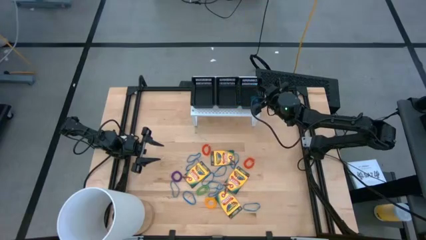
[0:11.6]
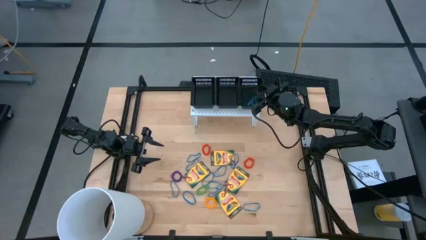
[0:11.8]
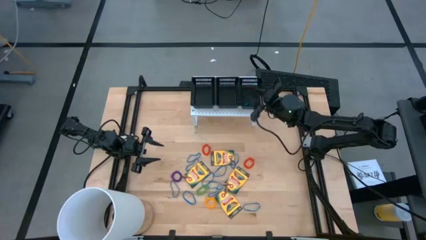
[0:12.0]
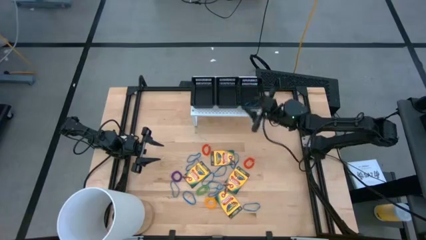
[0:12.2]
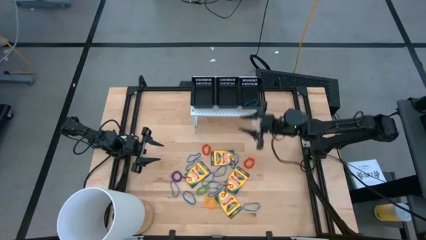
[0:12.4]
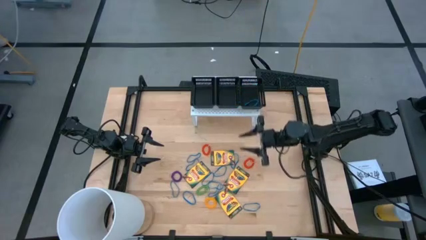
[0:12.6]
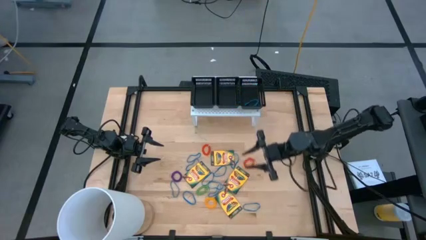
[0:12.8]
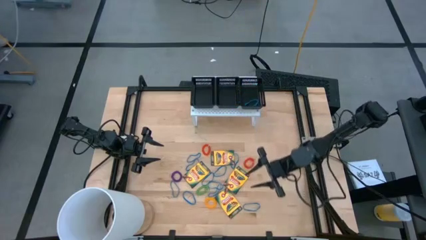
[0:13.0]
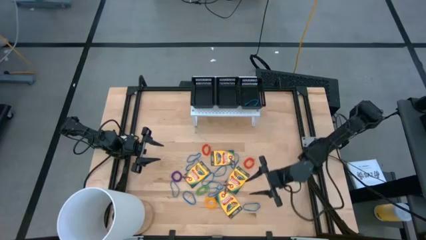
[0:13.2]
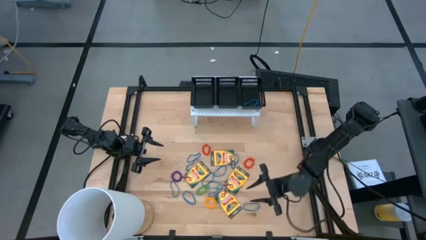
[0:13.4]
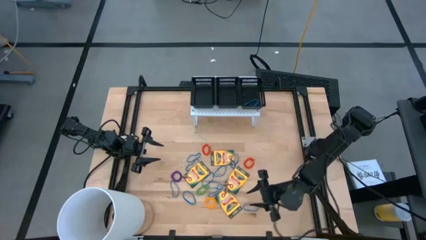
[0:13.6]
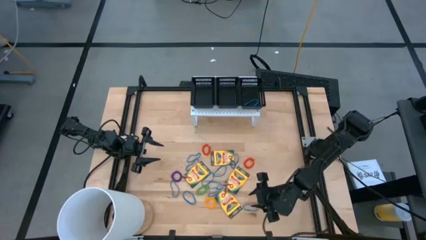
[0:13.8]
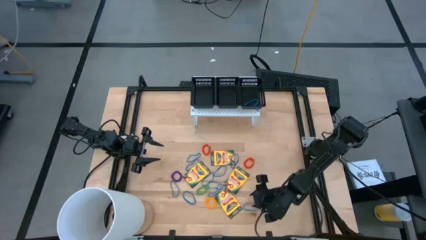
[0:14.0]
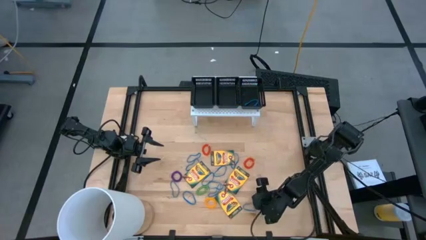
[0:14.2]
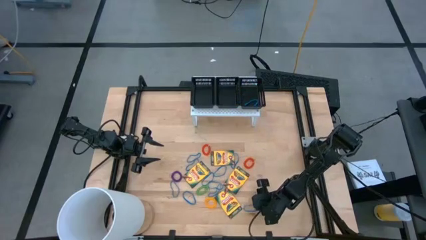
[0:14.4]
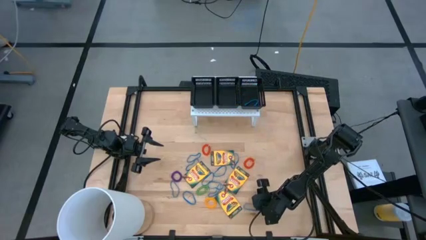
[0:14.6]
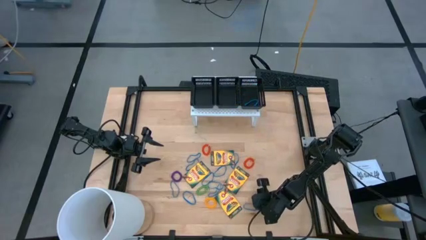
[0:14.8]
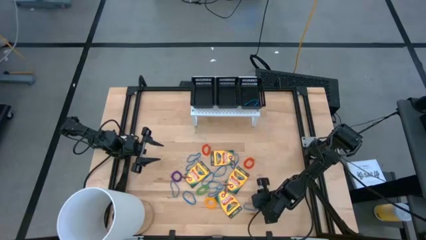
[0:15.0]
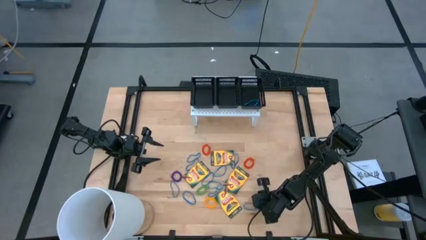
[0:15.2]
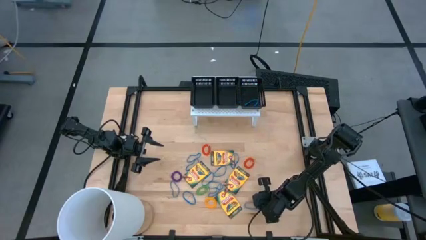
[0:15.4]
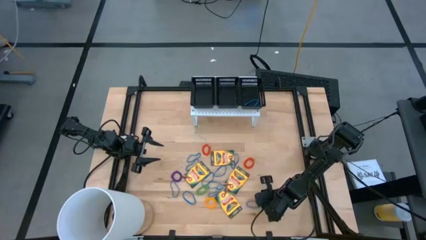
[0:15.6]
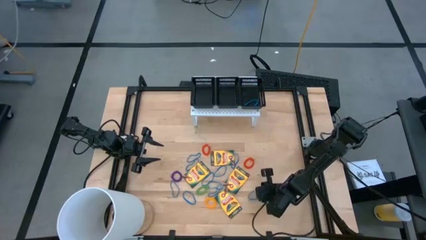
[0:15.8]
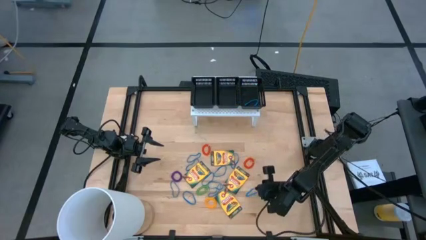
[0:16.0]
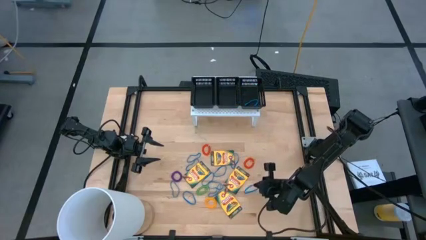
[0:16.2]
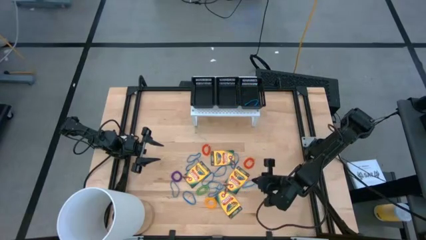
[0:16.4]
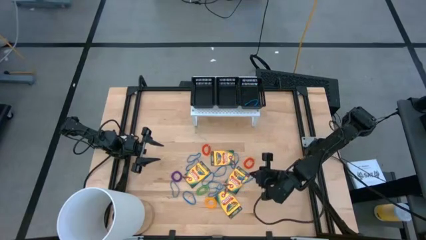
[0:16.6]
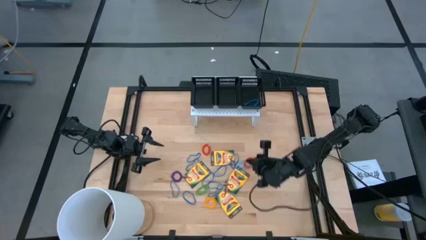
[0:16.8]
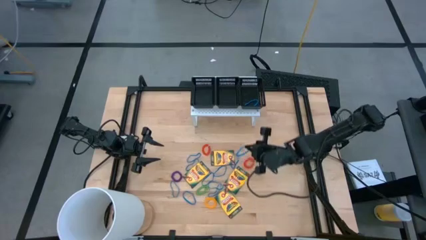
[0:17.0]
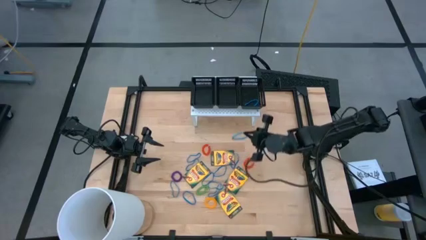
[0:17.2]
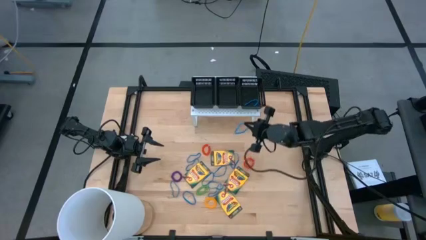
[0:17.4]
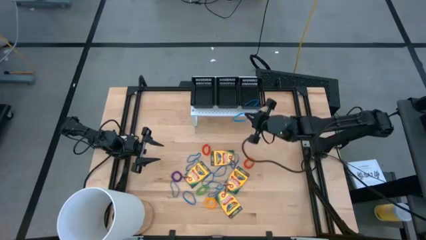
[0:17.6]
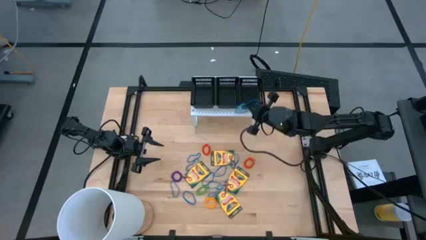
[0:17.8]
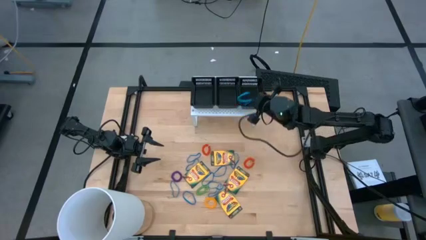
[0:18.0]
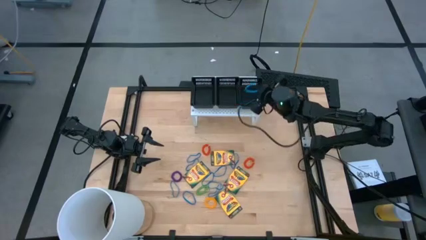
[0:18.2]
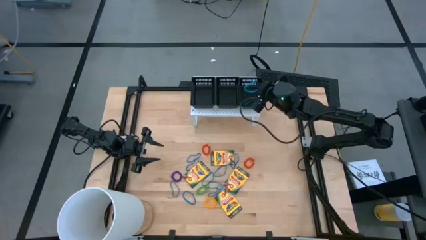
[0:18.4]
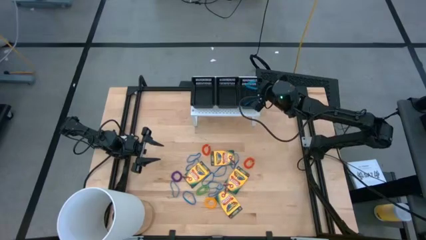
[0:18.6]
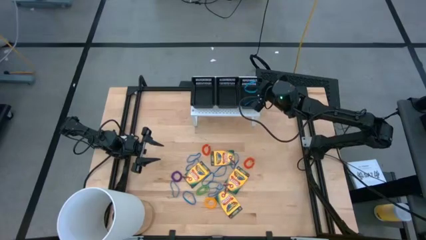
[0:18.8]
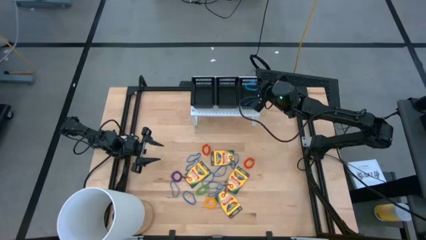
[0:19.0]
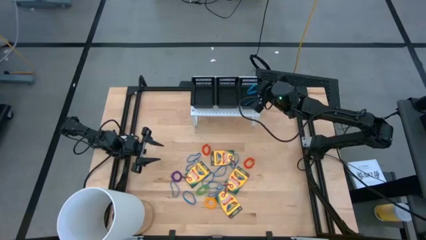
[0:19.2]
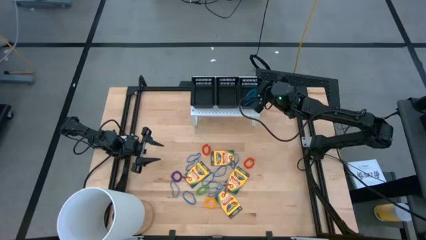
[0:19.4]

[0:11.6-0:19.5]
Task: Pick & Place Office Desk Supplies
Put the blue rubber band into the right black bin on the shelf

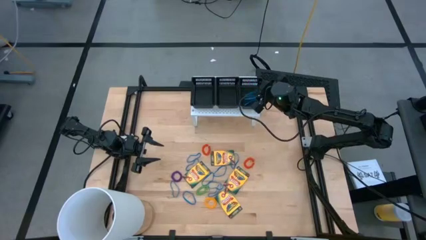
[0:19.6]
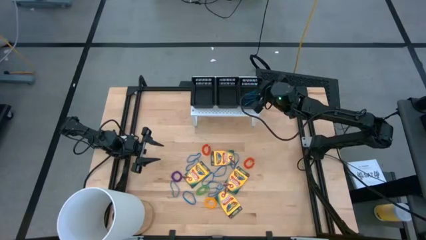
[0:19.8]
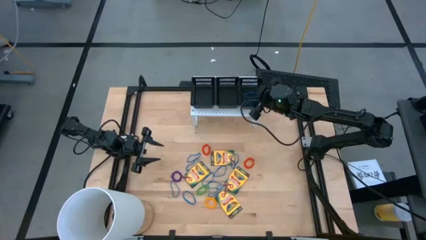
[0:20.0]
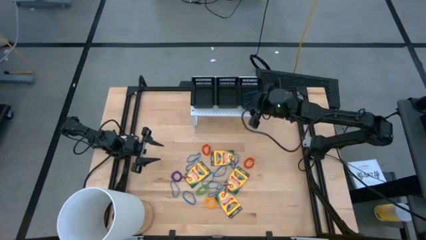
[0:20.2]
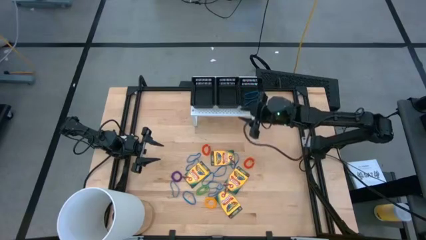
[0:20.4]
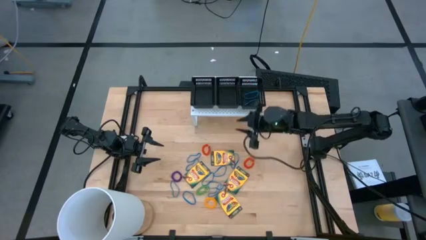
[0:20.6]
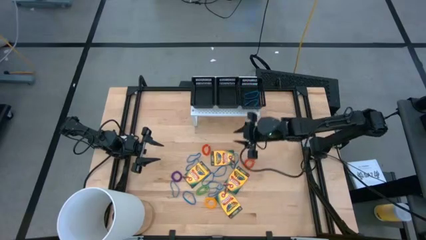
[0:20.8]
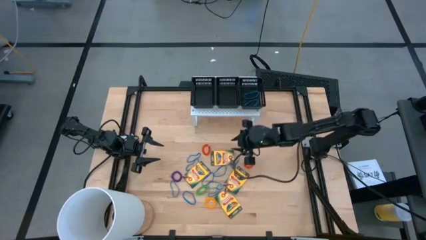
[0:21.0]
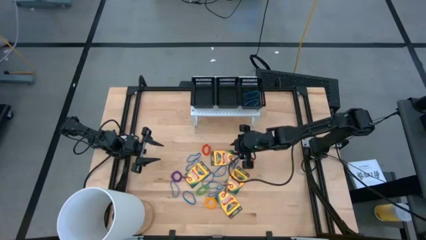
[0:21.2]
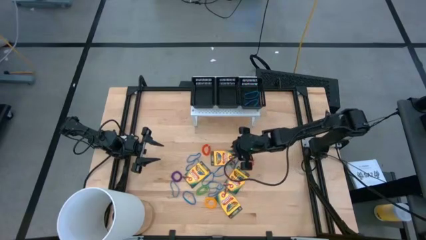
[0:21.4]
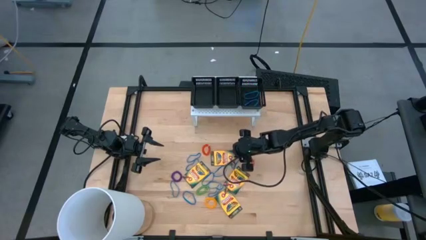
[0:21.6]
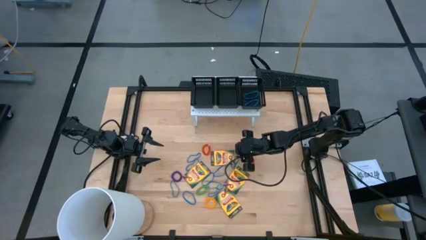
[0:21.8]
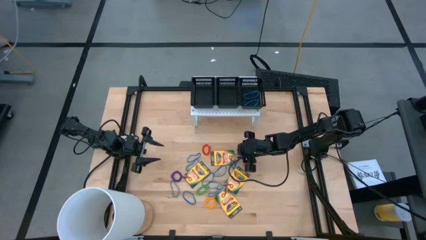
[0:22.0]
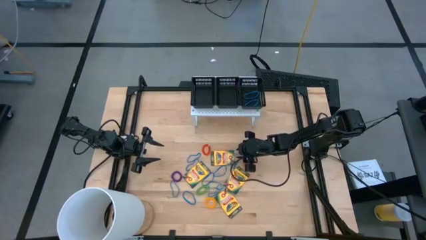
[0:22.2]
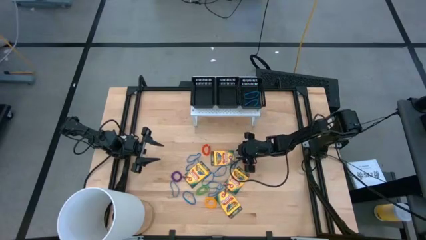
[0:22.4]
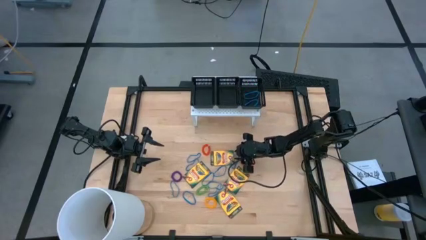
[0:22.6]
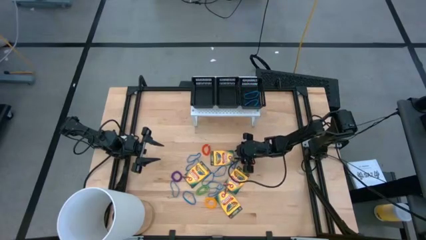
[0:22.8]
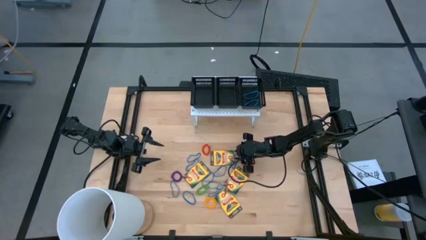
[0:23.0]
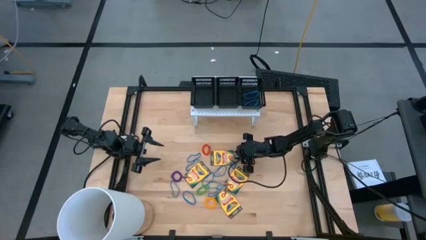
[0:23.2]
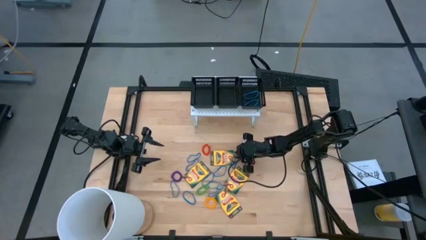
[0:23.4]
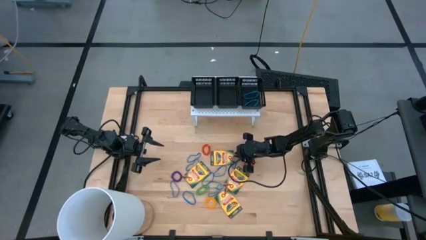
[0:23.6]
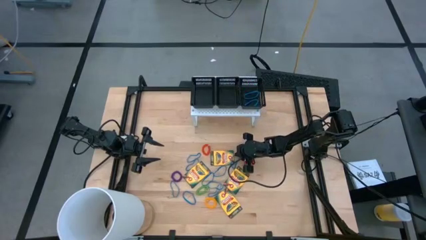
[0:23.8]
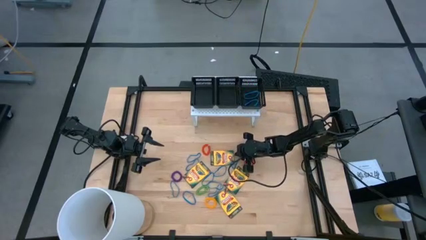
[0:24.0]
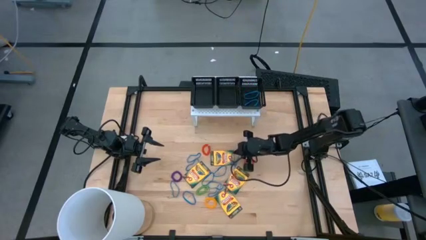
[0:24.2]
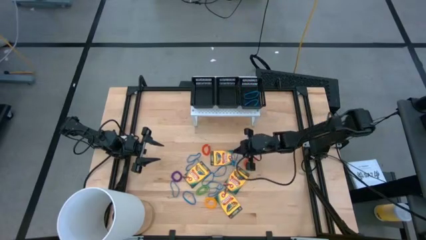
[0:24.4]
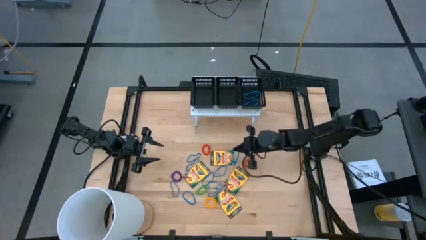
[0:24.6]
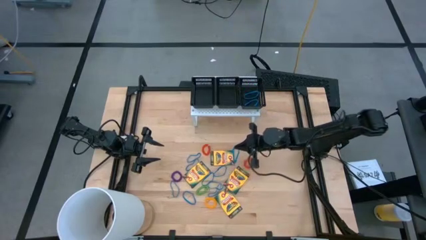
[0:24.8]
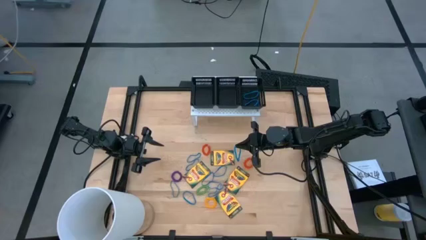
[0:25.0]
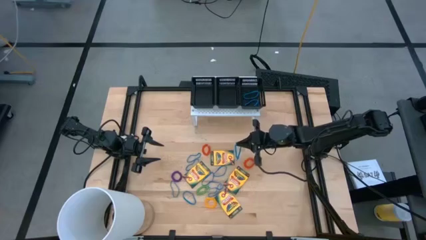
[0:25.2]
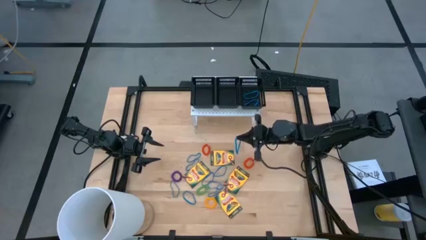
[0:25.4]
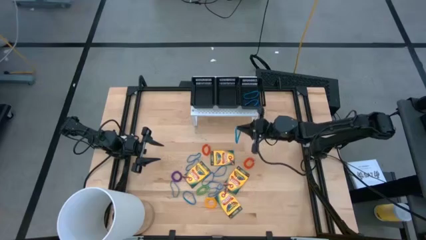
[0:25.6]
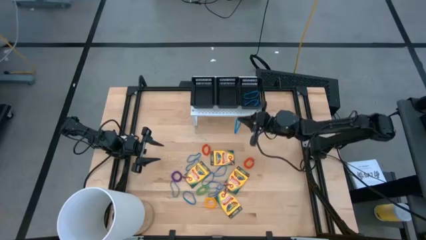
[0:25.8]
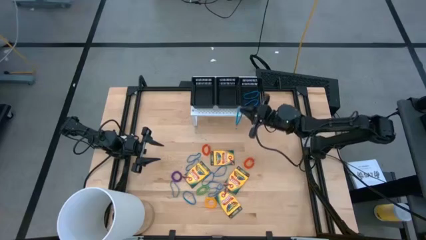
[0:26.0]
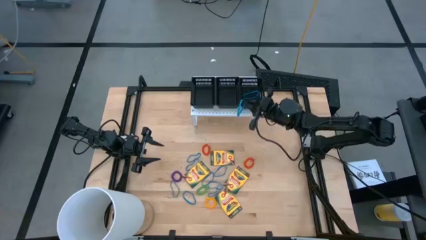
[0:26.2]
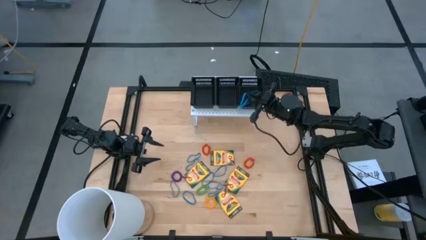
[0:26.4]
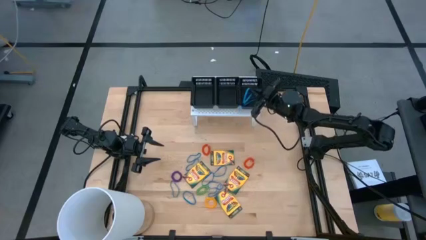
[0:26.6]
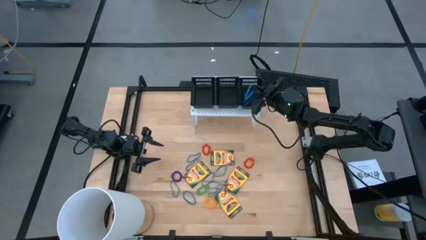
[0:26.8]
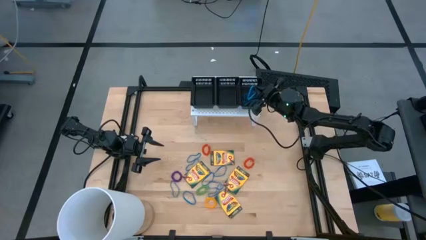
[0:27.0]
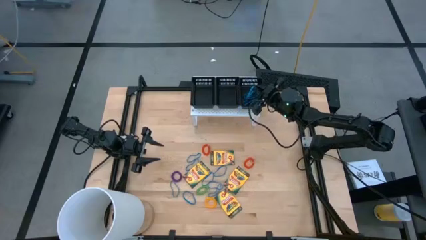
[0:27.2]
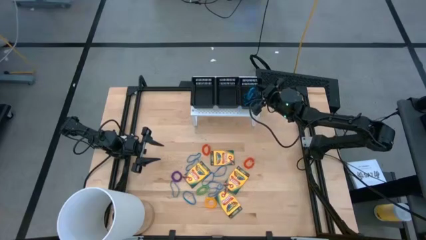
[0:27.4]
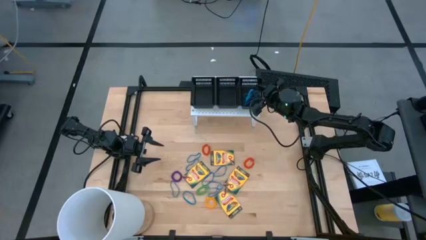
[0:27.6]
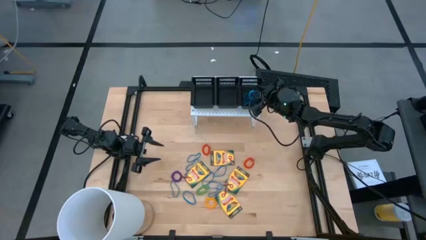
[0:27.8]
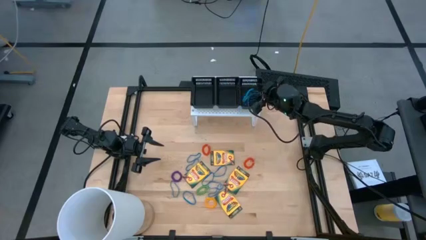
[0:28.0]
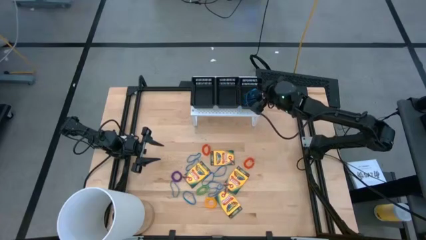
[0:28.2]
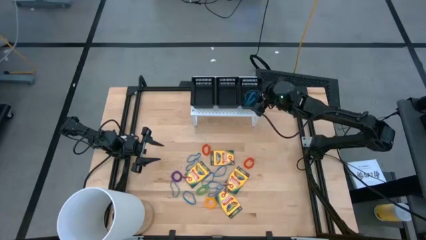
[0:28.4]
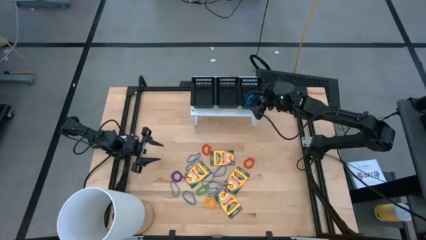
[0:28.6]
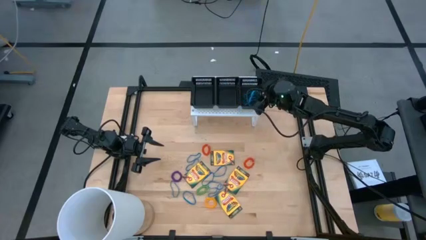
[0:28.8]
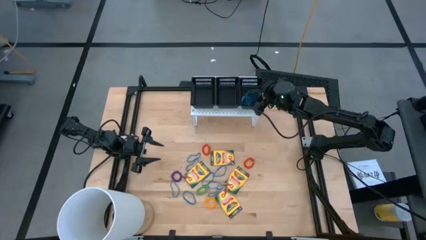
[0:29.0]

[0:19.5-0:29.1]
Put the blue rubber band into the right black bin on the shelf
